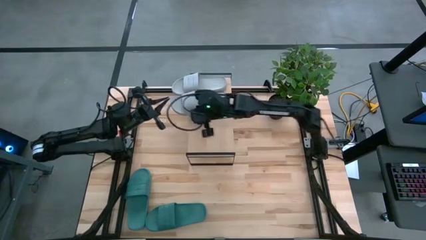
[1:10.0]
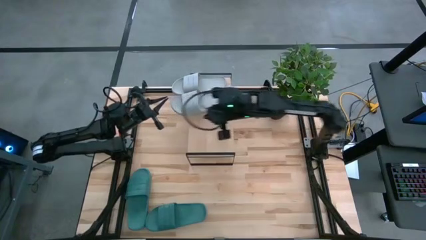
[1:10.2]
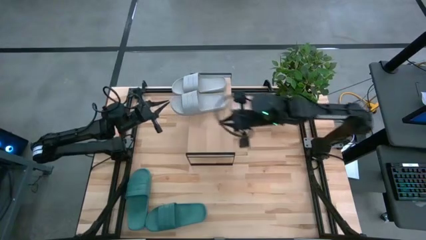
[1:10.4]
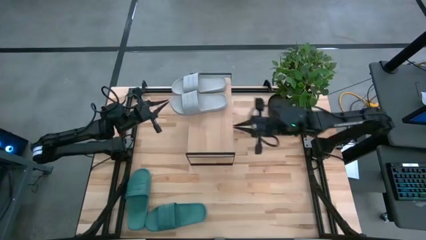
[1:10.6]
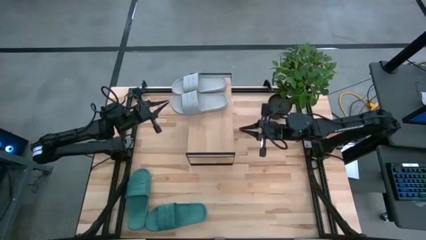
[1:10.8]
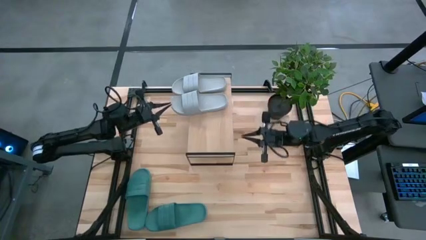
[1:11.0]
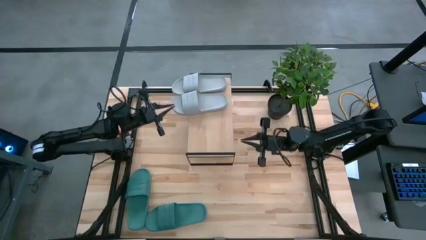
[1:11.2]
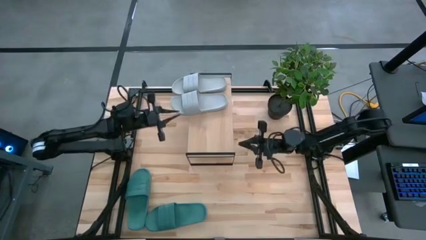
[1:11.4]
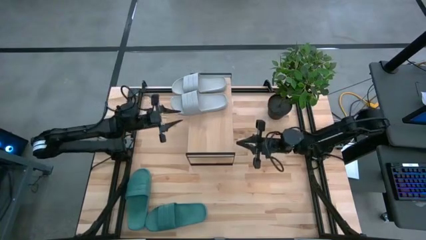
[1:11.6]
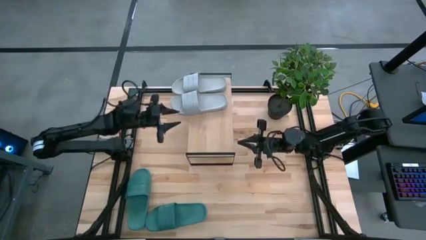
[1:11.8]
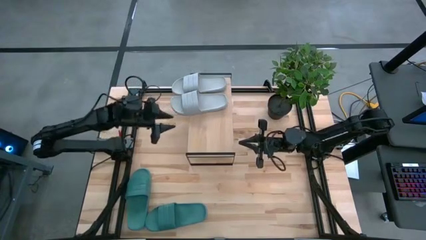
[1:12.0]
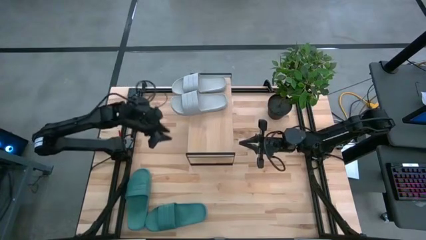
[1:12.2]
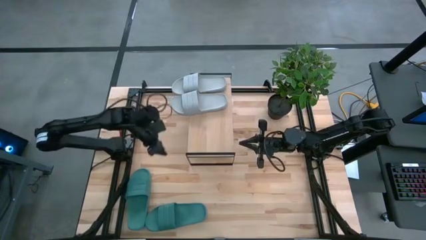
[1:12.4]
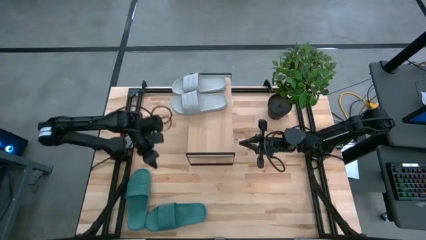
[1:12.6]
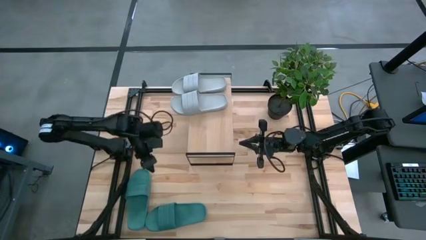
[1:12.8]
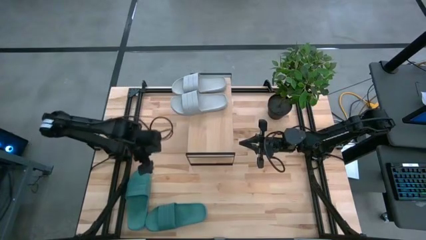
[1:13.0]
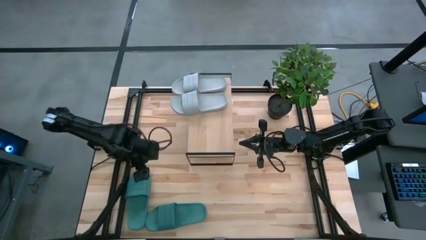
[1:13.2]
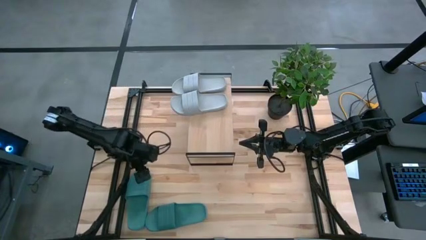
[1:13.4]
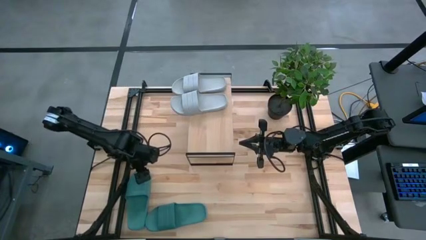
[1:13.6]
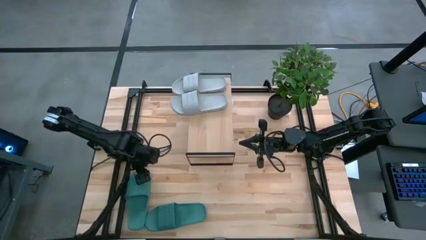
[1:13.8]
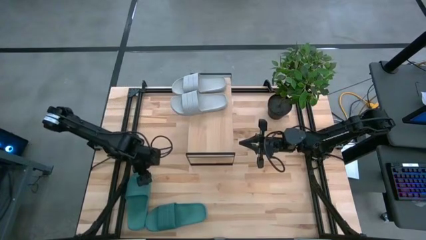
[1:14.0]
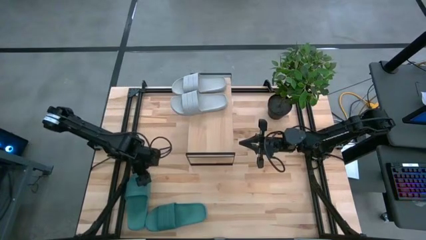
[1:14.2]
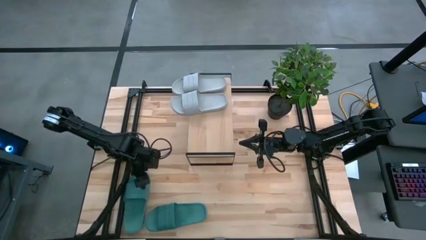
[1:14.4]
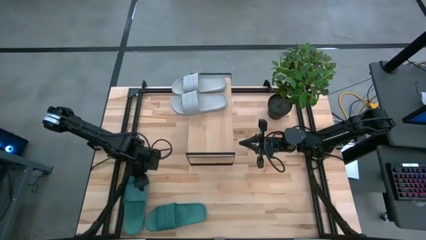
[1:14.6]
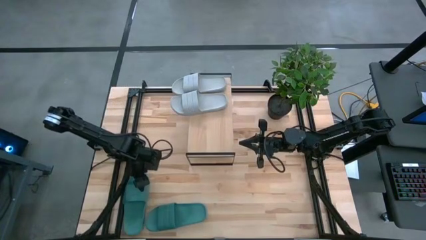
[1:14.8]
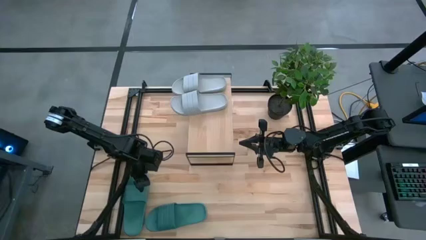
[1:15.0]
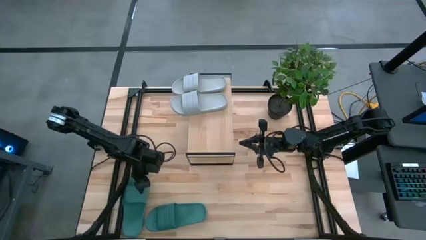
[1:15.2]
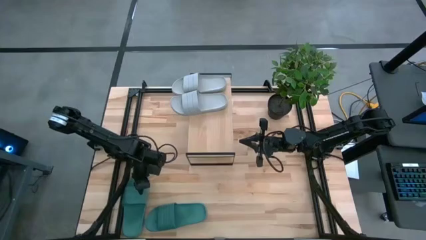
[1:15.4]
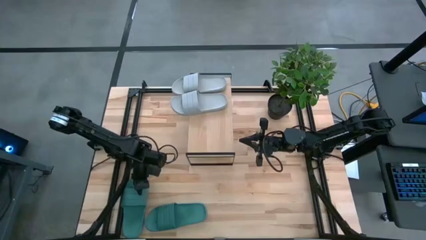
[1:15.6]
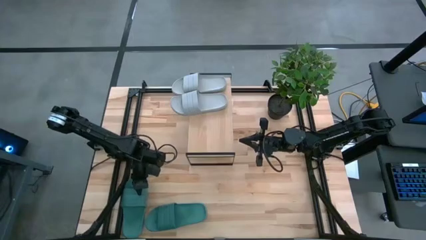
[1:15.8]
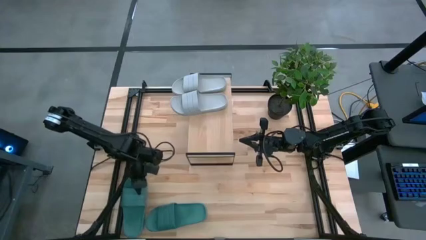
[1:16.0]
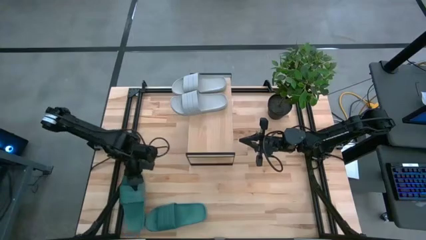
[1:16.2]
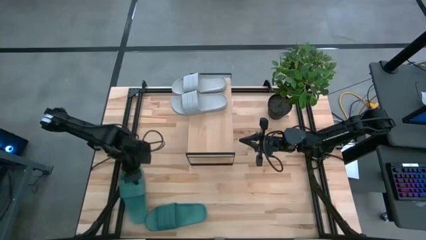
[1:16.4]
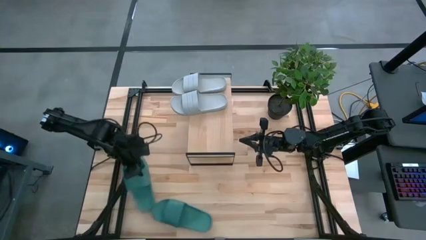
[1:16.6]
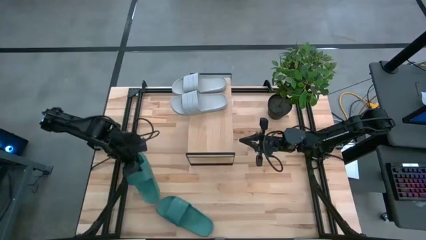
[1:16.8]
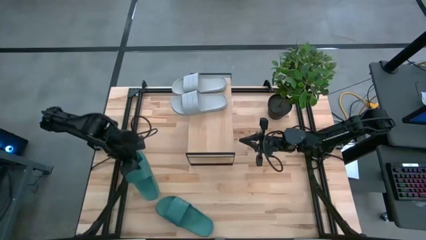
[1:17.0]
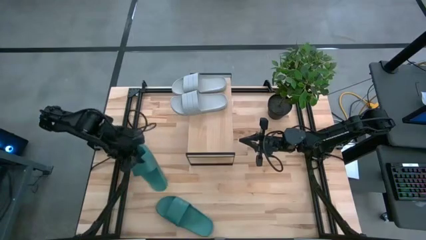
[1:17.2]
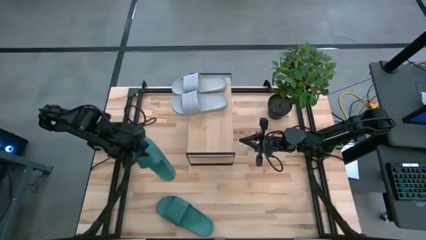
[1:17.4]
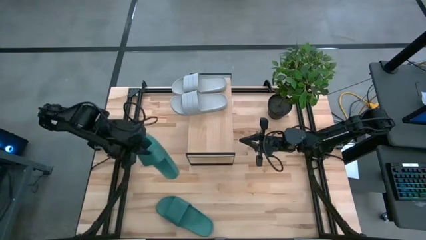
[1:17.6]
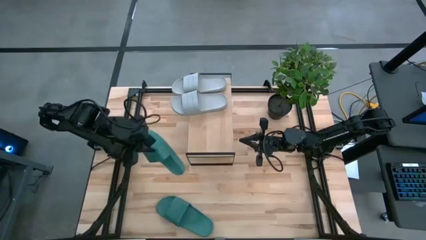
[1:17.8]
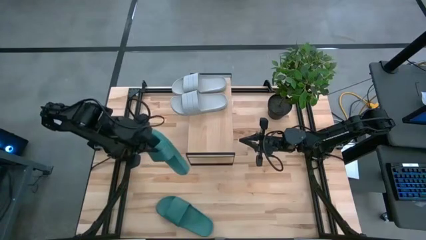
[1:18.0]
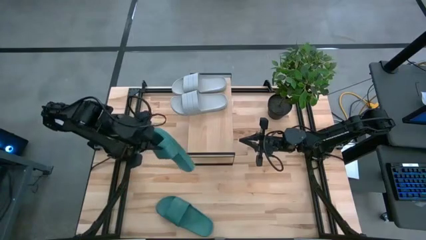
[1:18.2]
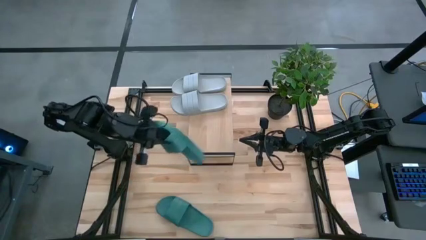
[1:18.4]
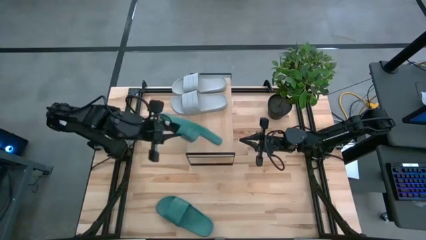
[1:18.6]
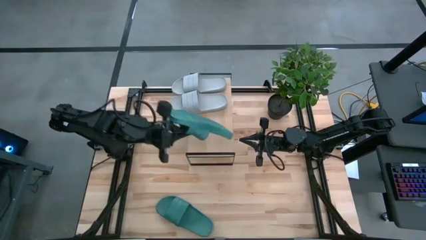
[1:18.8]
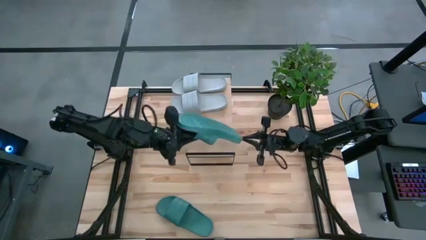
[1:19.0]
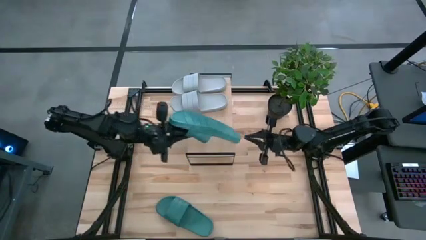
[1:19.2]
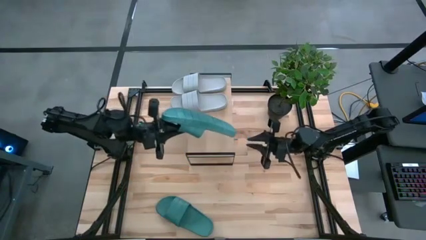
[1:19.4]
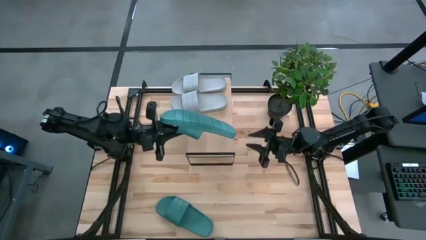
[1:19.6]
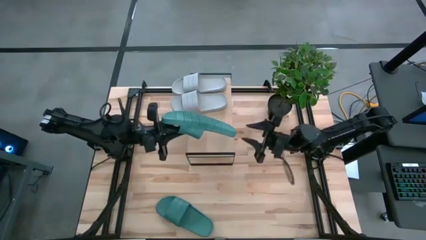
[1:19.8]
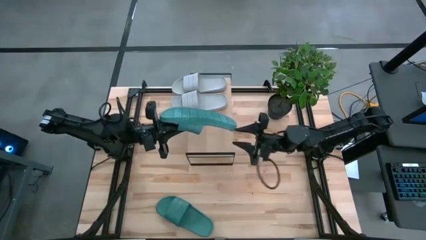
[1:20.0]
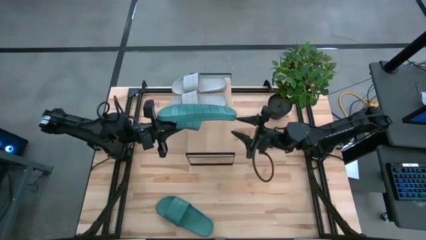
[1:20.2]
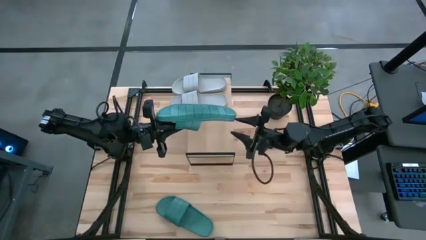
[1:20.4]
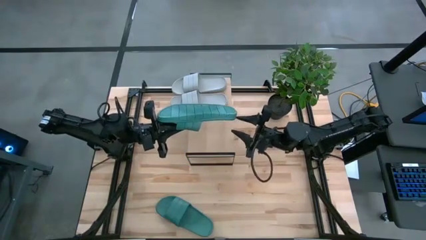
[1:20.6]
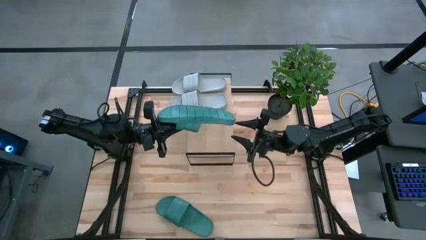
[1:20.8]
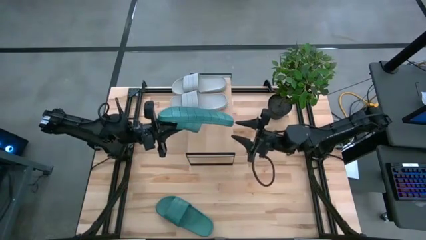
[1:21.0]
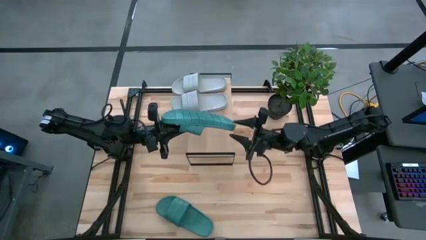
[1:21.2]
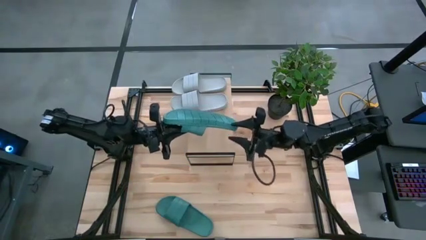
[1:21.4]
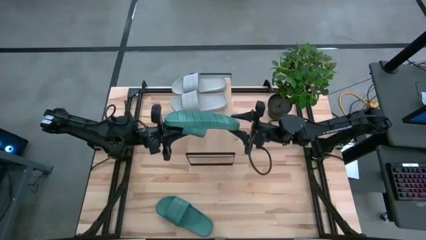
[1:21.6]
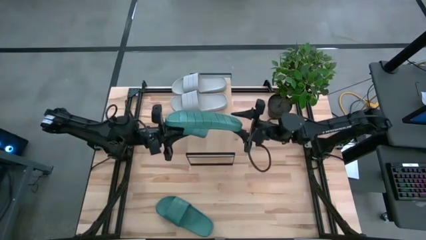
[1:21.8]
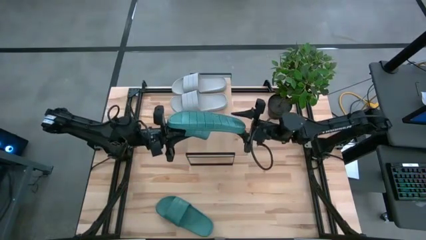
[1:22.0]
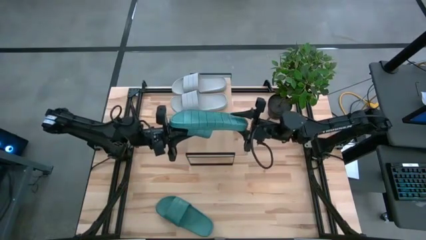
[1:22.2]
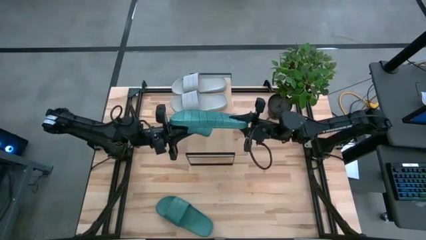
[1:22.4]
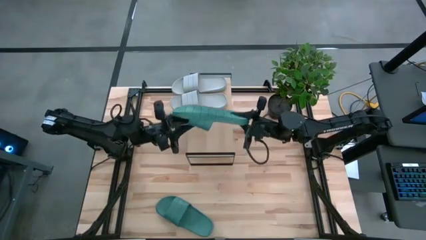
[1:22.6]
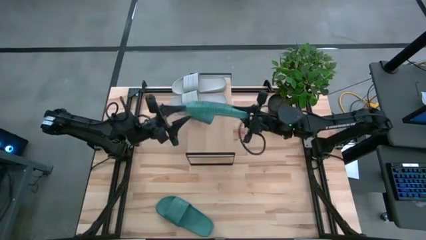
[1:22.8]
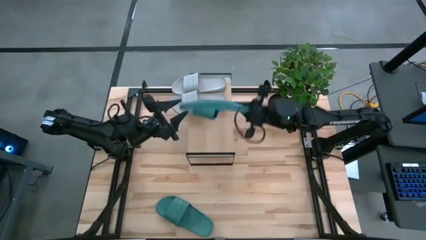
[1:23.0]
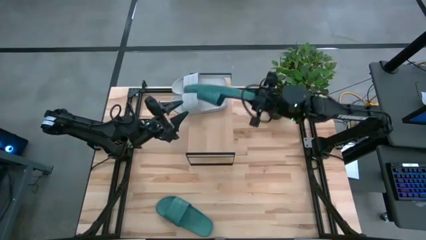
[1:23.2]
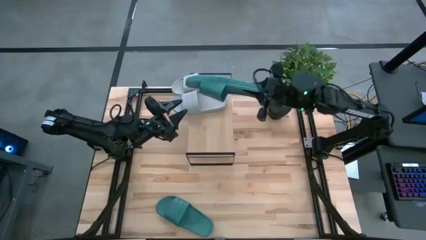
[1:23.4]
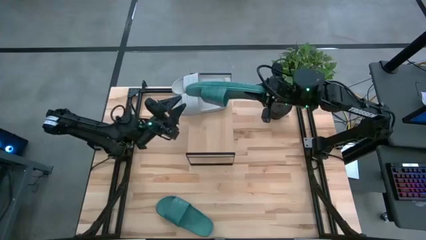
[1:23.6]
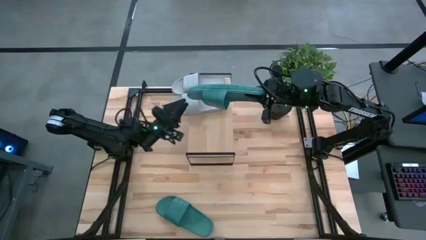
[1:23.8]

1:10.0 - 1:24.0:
Task: Pick and place slides into the shelf
Put the left blue slide on the shelf

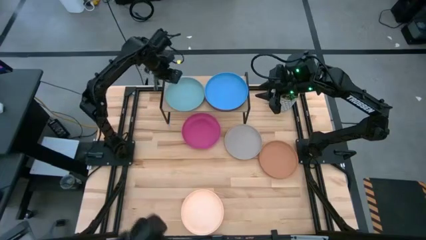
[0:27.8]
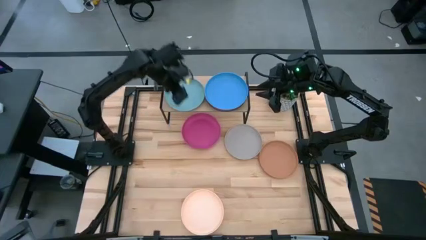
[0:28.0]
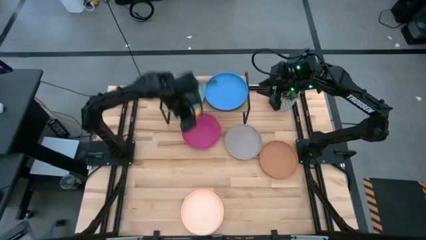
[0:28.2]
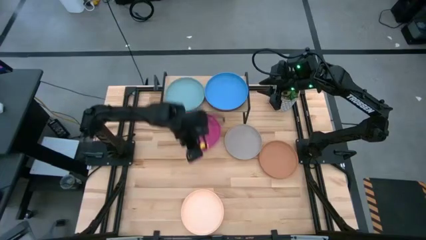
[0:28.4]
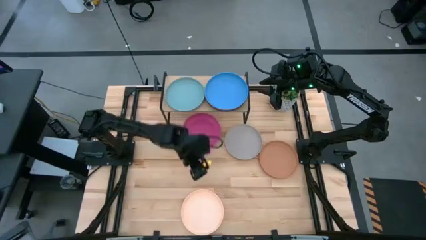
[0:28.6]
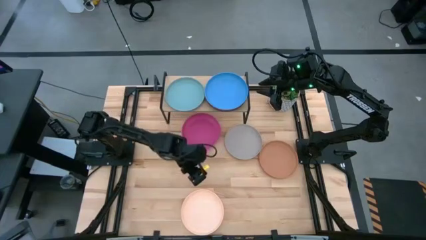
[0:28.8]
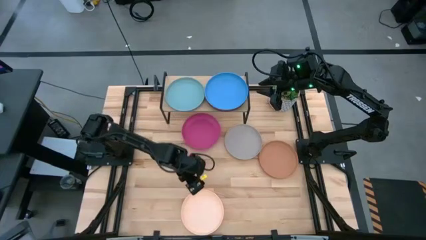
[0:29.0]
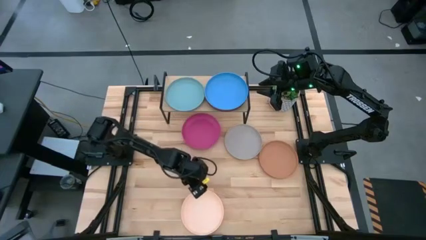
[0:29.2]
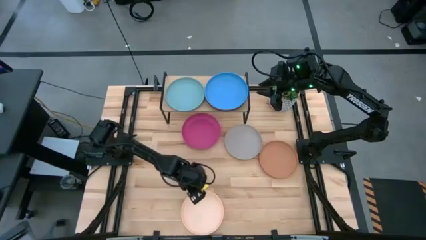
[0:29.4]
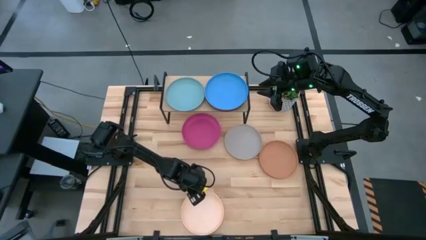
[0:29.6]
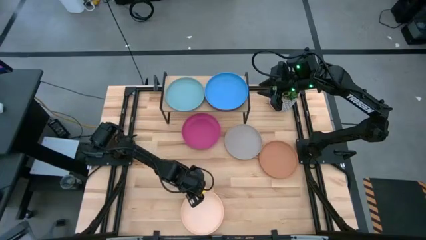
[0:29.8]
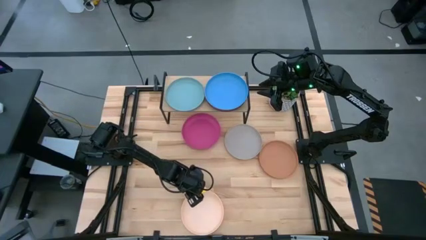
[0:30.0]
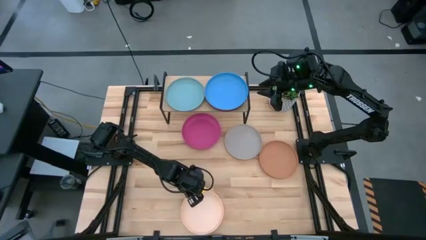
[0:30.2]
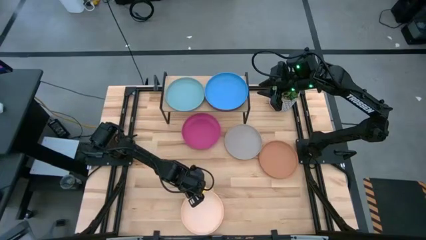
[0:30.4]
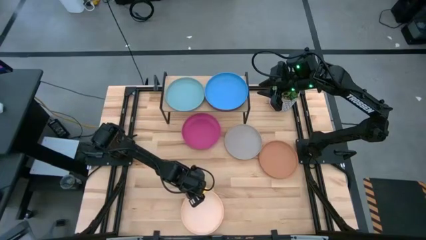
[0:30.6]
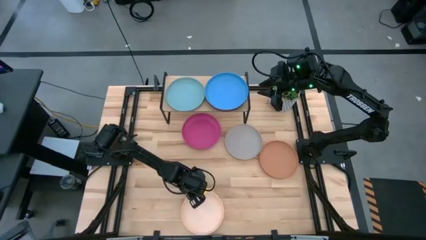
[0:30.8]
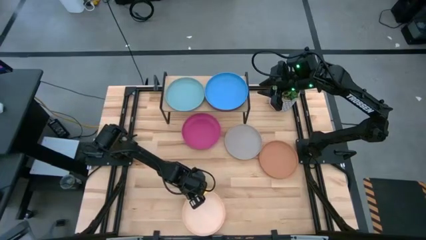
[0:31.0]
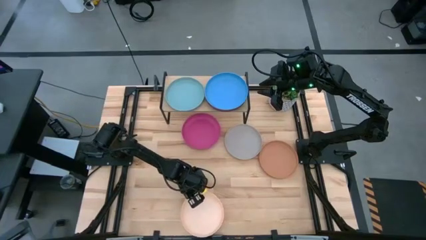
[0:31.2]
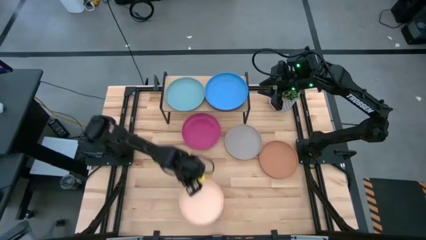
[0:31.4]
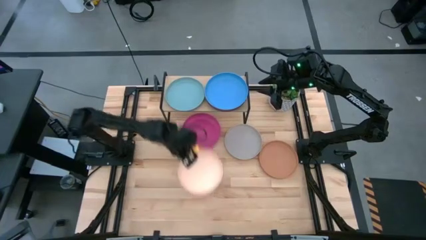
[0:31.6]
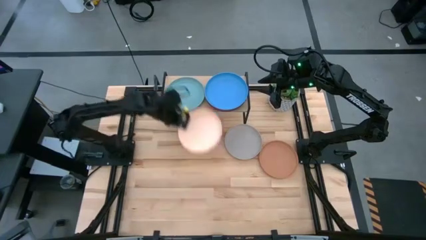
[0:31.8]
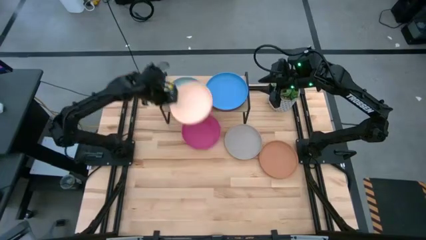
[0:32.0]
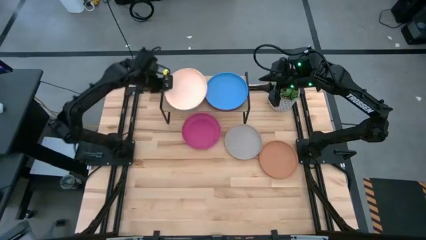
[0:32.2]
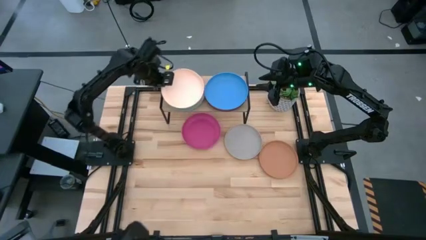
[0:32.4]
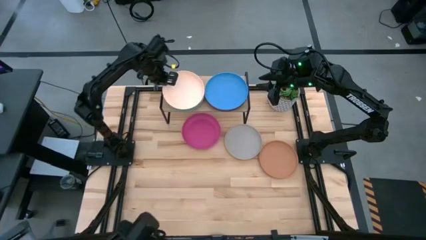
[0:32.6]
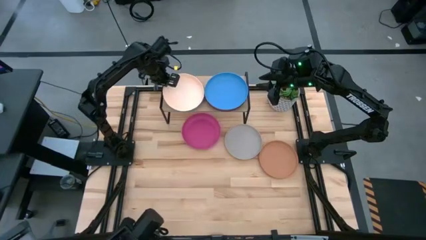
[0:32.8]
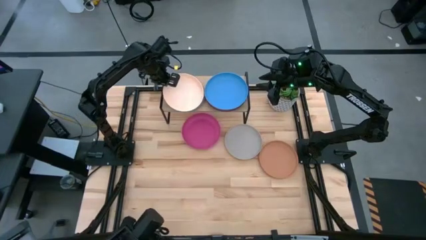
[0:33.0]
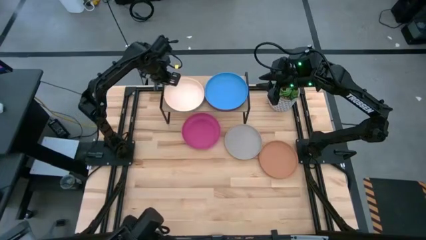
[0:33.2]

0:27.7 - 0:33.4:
Task: Place and stack plates onto a shelf
Stack the light orange plate on the light green plate on the shelf
